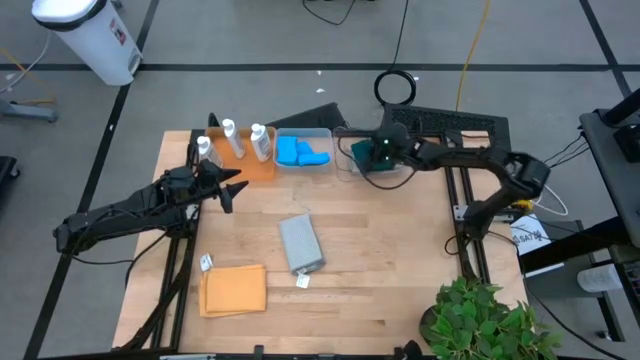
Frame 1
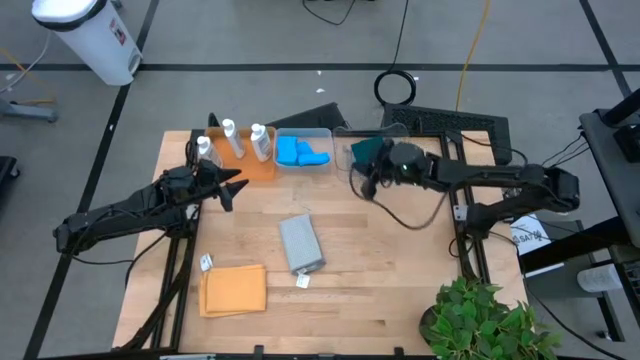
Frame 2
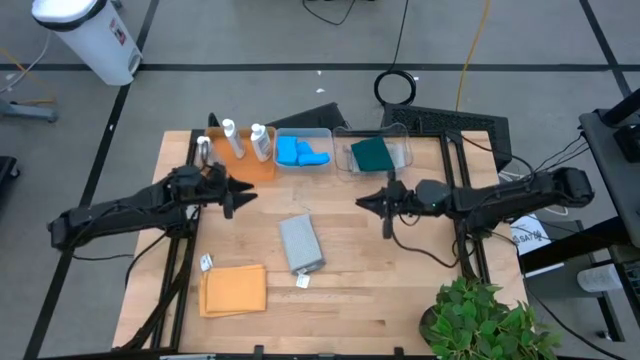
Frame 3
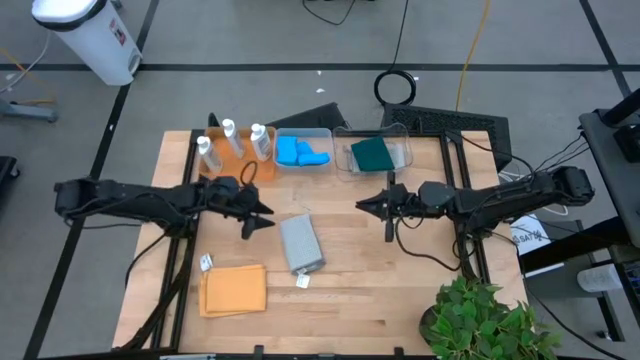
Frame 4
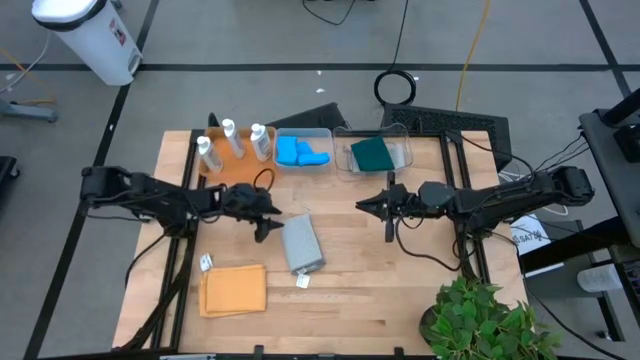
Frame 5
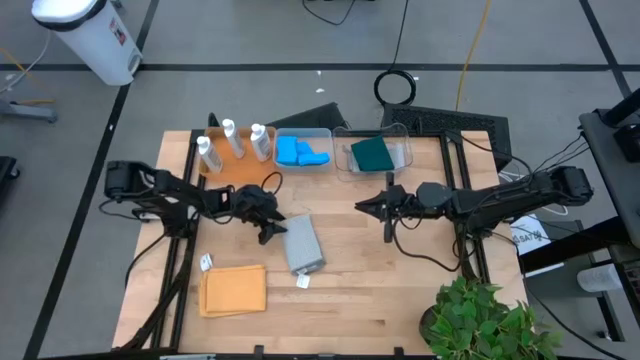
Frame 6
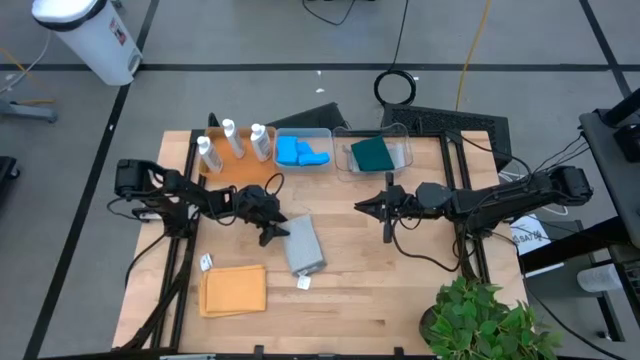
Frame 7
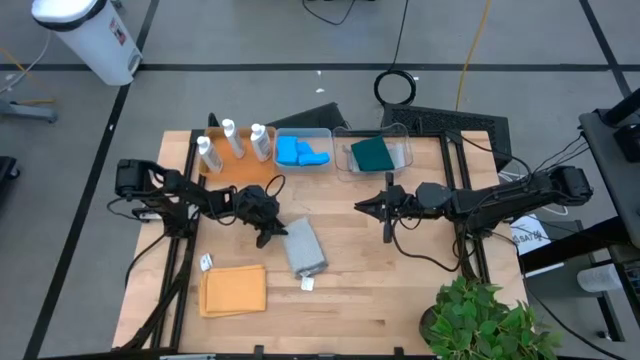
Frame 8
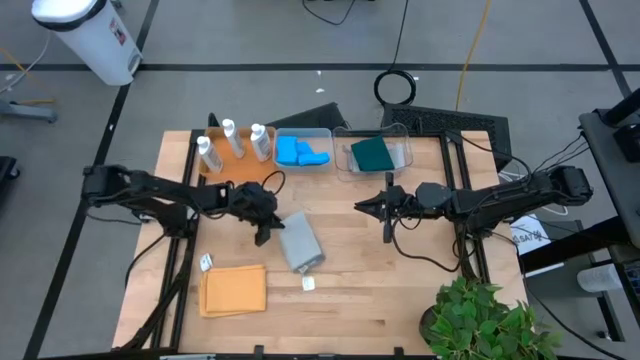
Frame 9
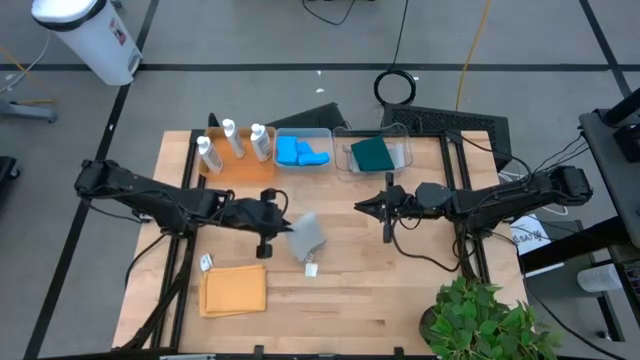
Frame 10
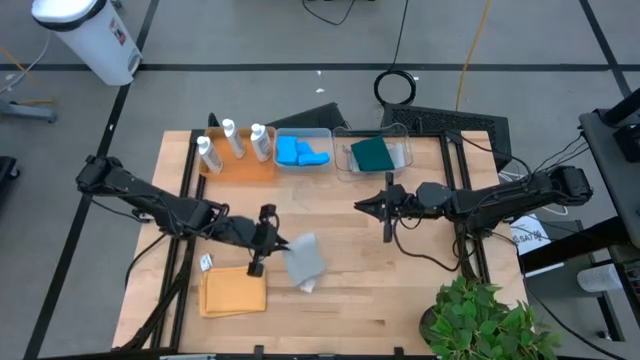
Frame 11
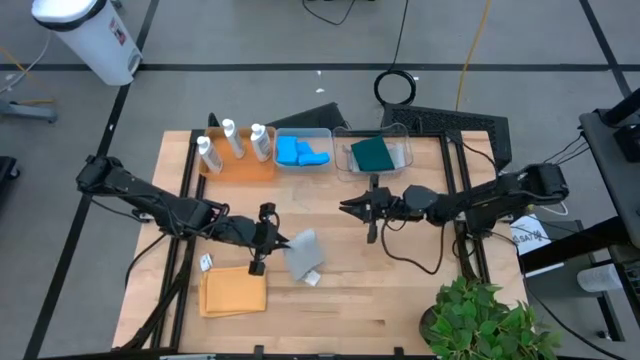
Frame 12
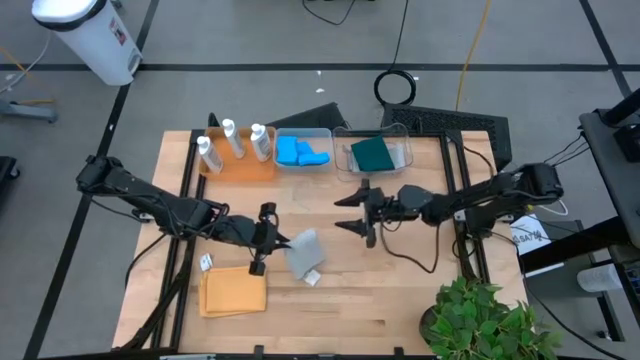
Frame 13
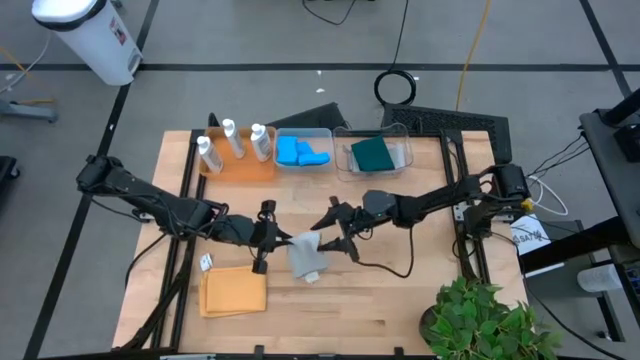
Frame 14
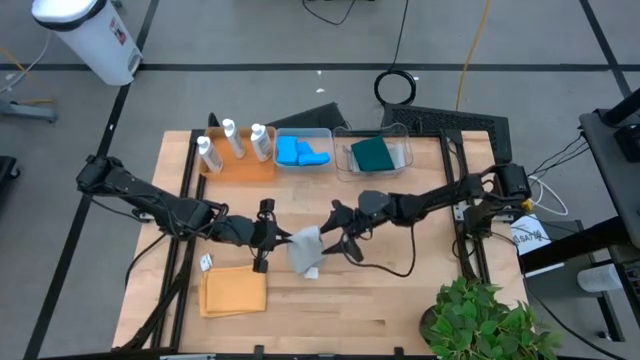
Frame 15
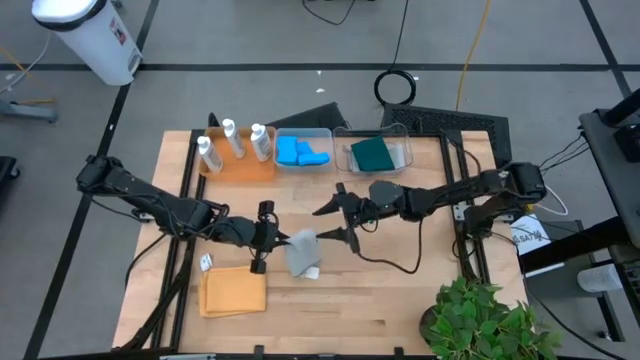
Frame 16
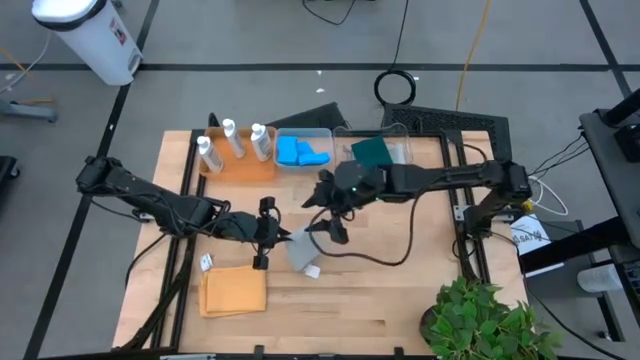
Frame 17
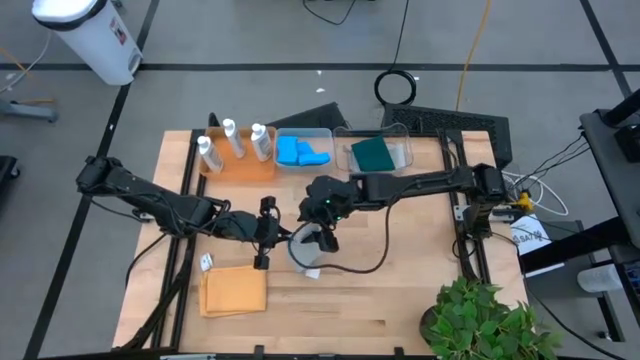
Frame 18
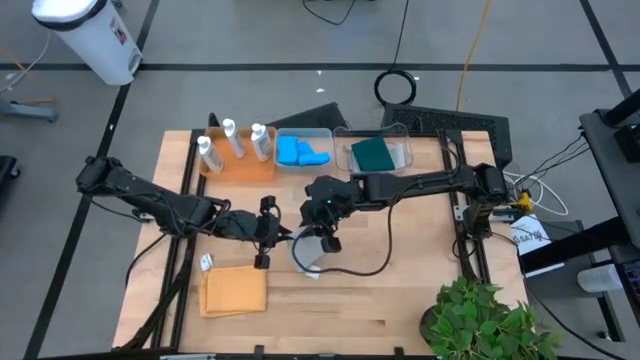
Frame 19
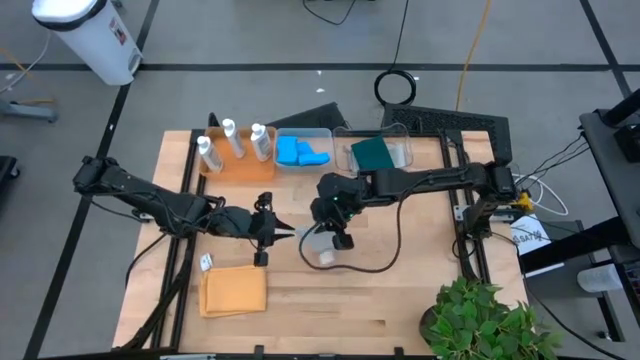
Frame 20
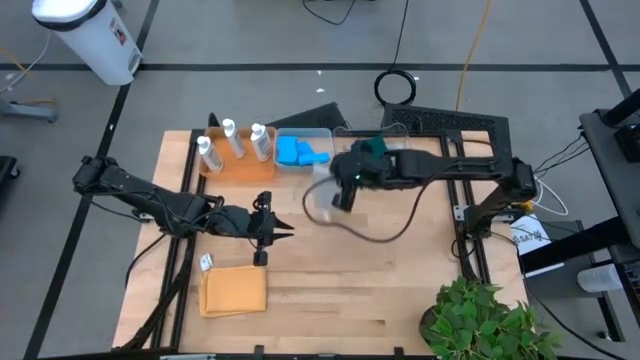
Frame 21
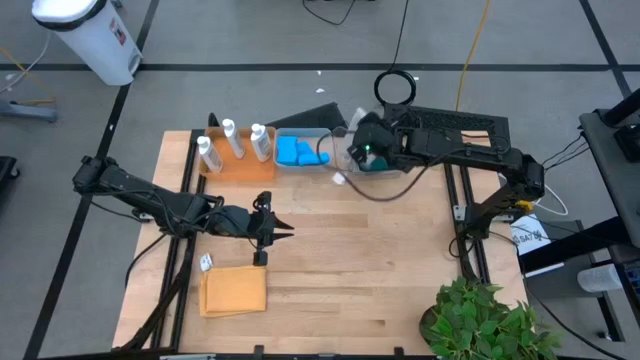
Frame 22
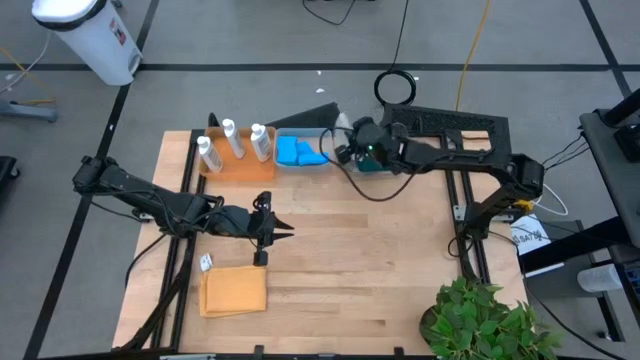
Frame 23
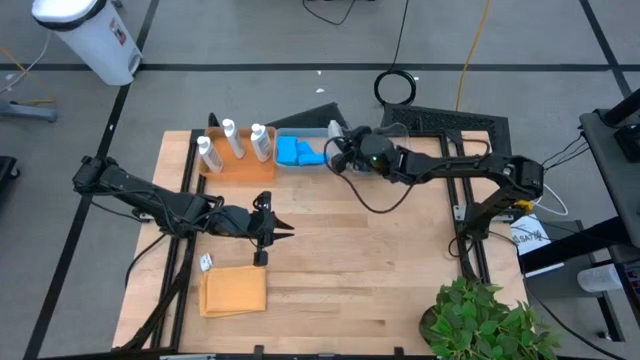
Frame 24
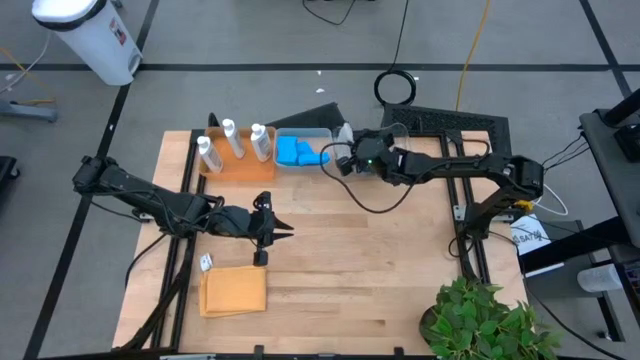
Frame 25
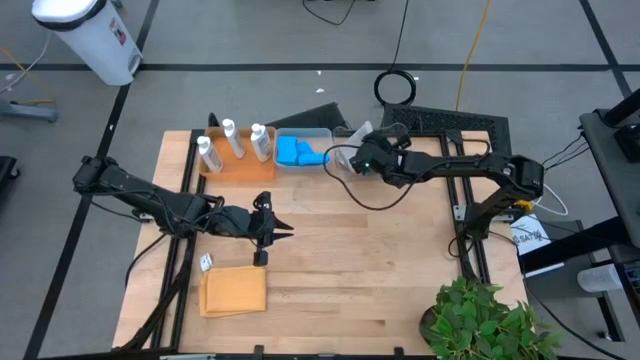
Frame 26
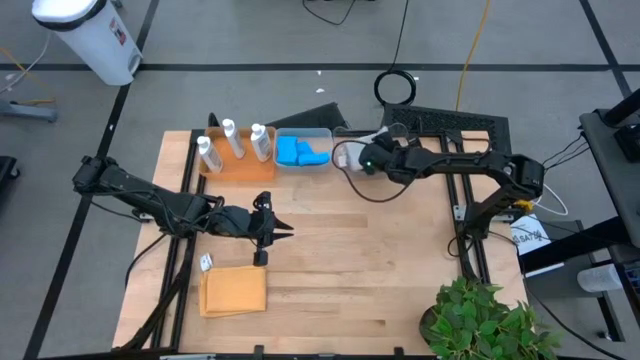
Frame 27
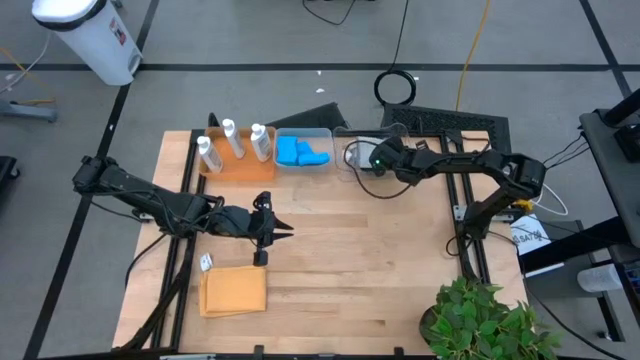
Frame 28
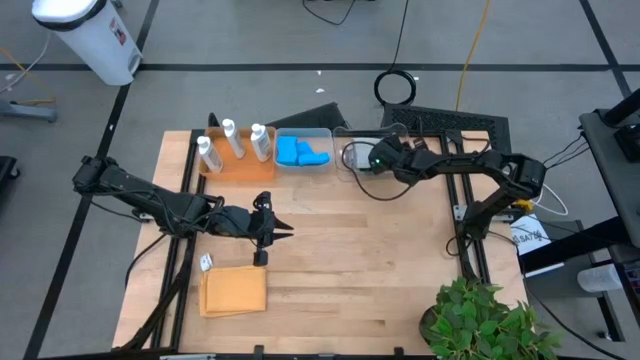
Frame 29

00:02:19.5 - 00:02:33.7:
Task: Pick & Place Kitchen Items
Put the gray towel into the right transparent bin

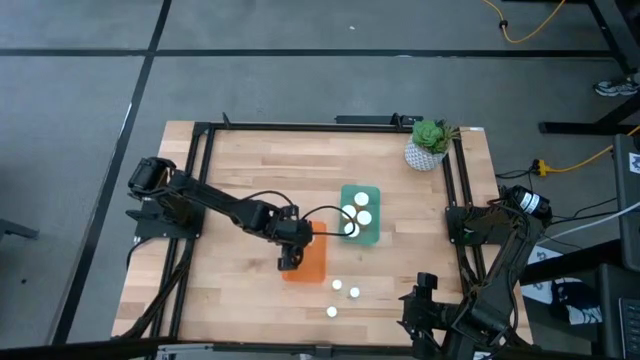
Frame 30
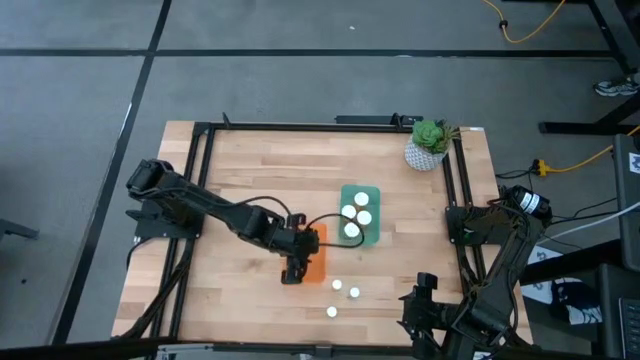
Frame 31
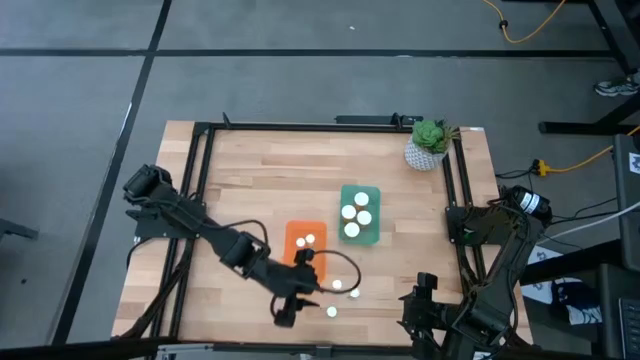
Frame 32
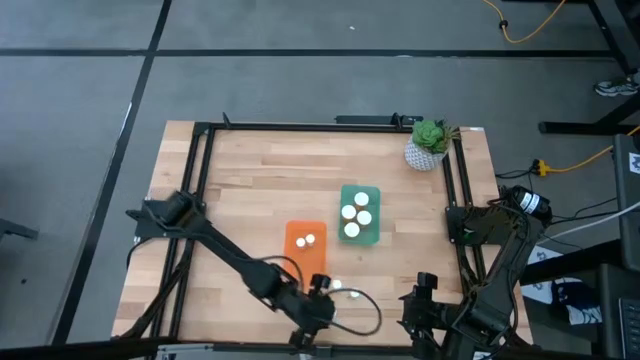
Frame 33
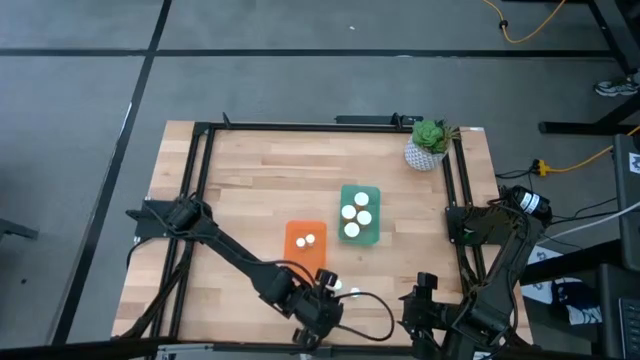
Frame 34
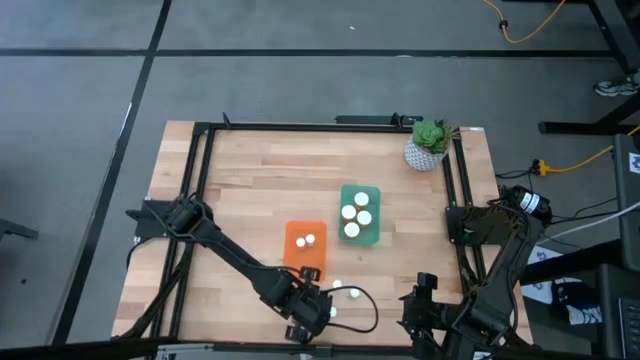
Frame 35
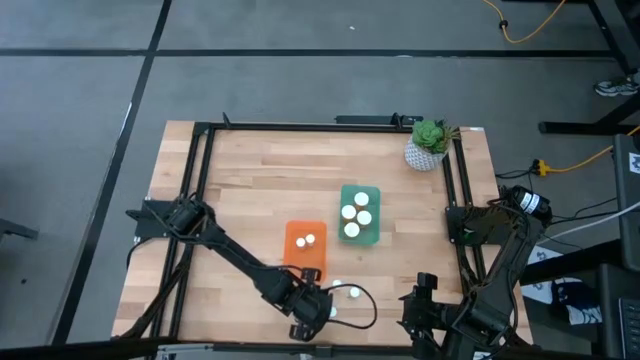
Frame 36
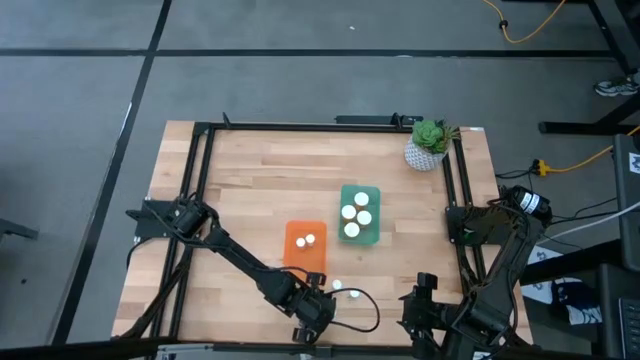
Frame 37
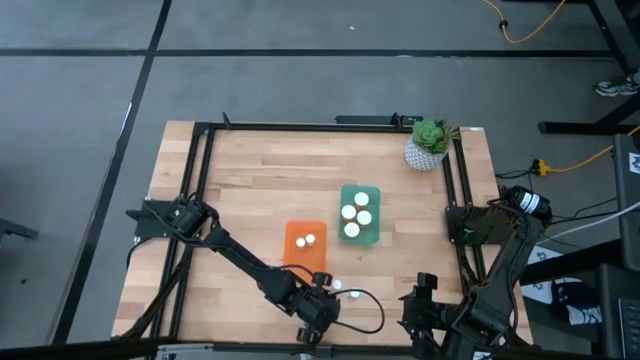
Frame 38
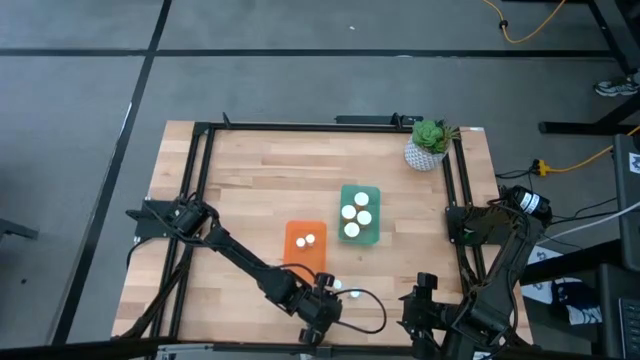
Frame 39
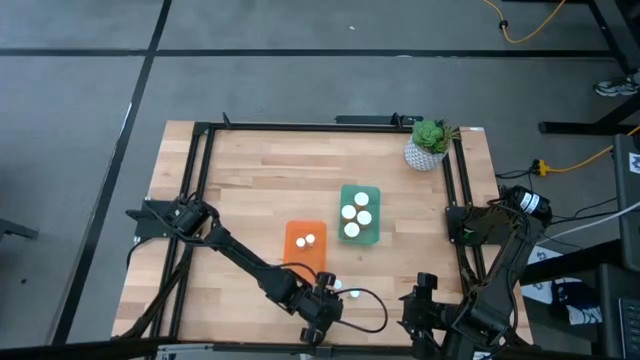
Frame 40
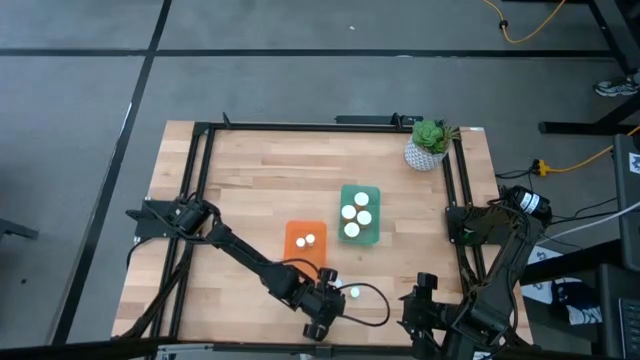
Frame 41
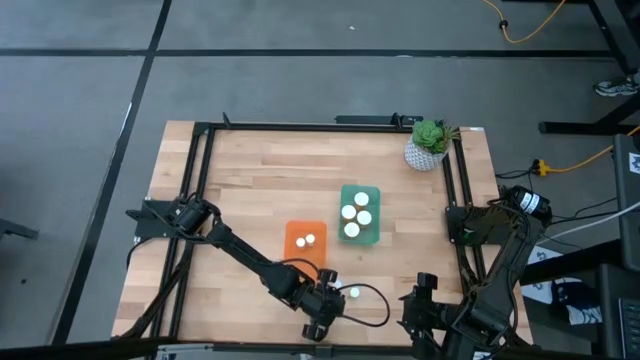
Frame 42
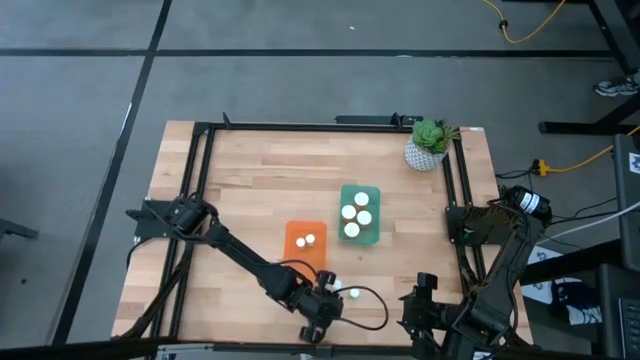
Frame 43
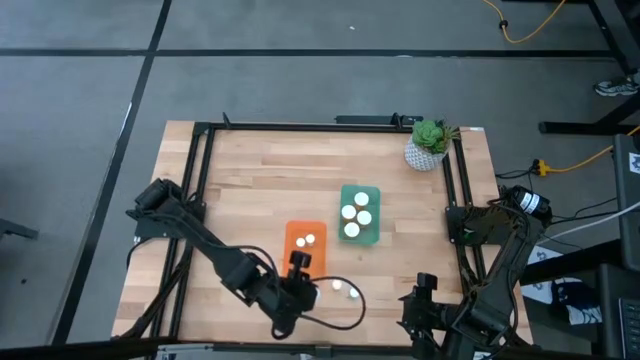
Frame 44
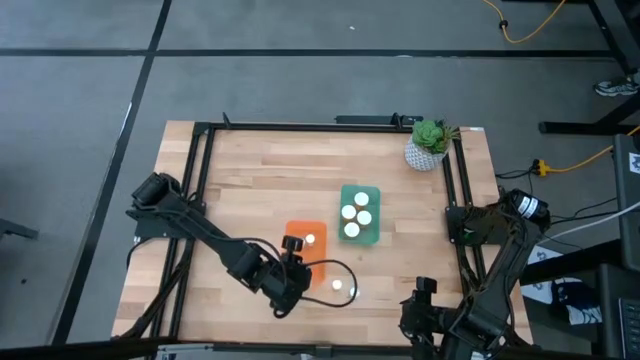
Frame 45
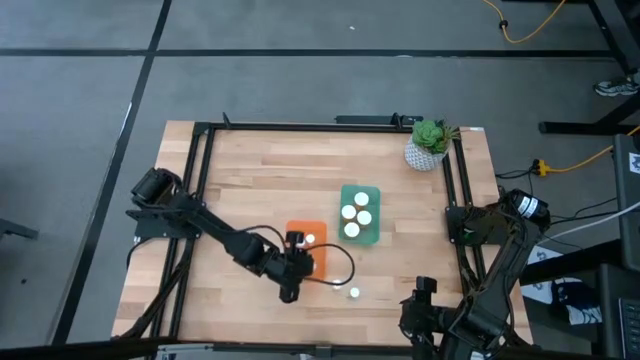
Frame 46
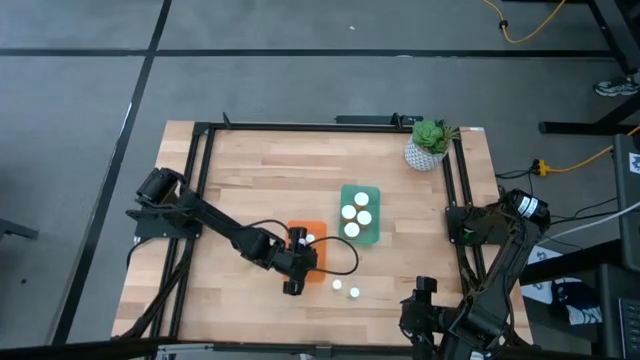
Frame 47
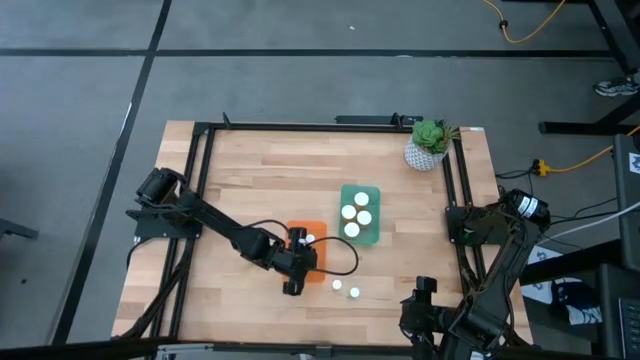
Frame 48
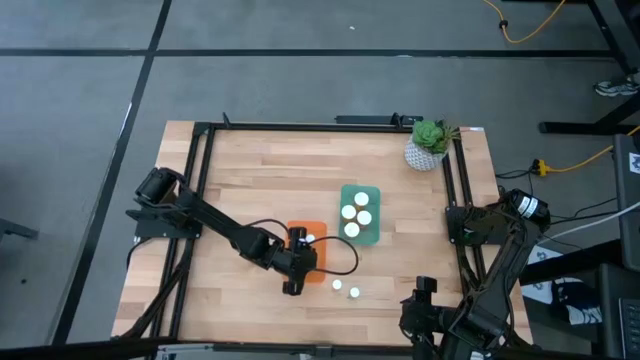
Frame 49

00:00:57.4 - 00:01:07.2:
Task: Pick and place medicine bottles into bin by pill shape (circle, oval)
Put the small green tablet bottle into the orange bin
